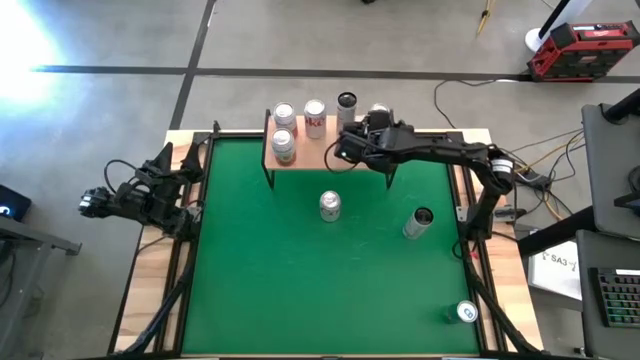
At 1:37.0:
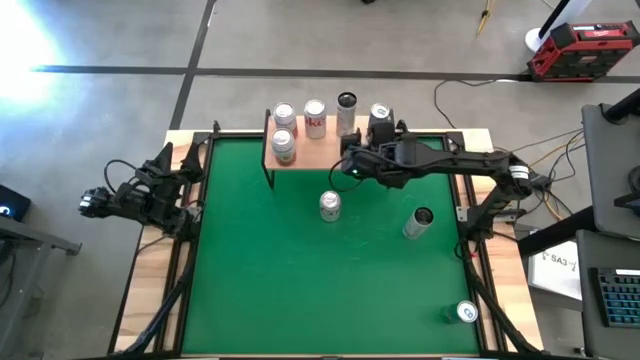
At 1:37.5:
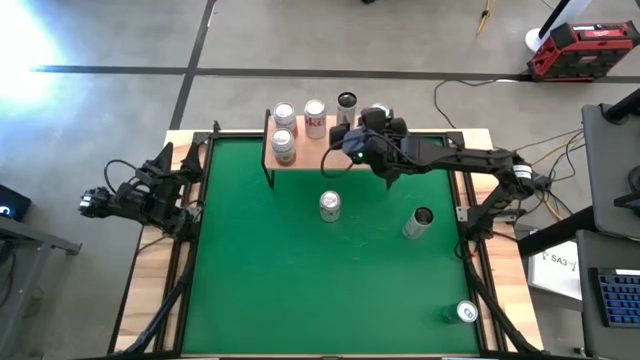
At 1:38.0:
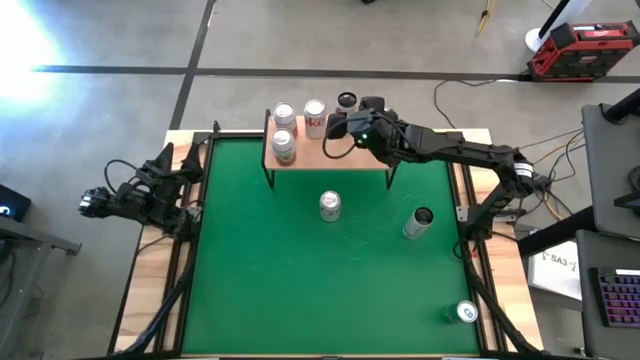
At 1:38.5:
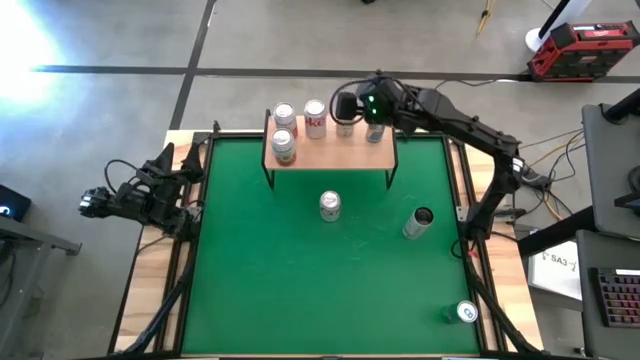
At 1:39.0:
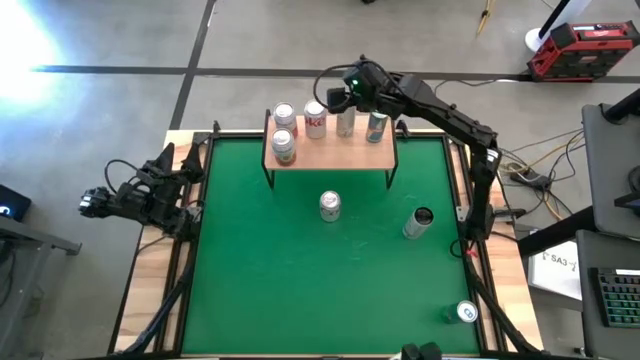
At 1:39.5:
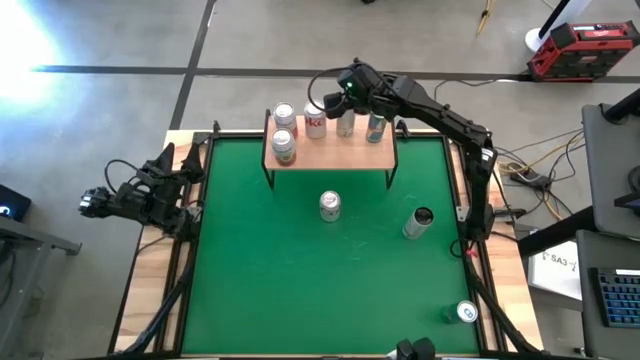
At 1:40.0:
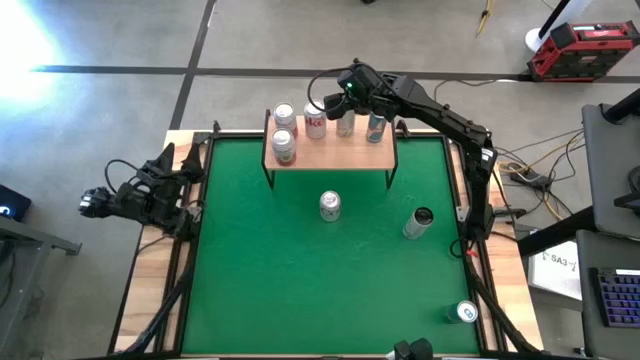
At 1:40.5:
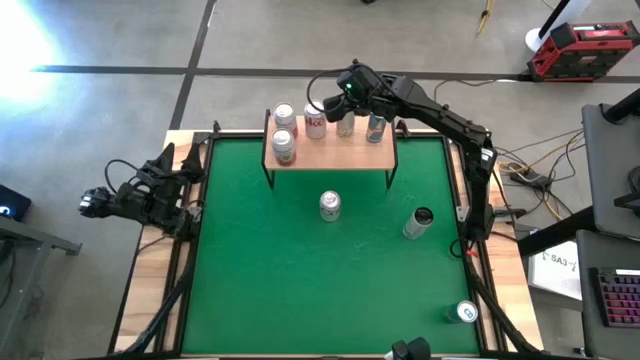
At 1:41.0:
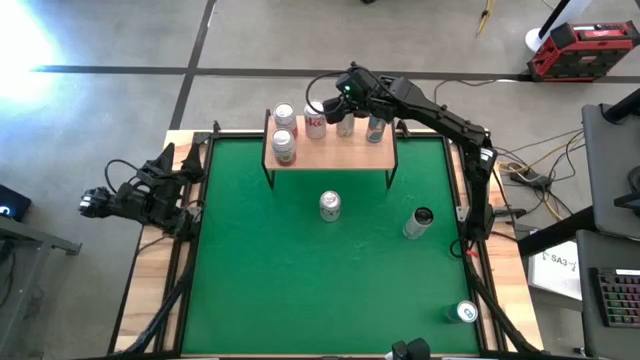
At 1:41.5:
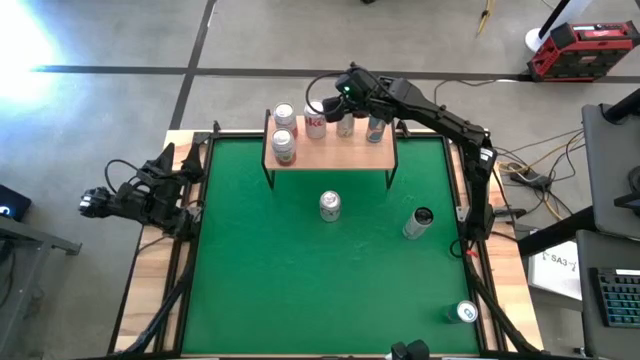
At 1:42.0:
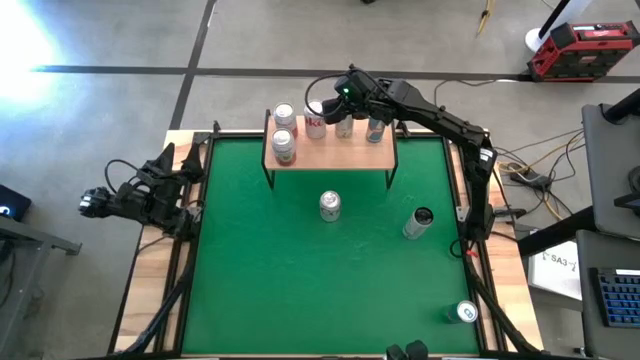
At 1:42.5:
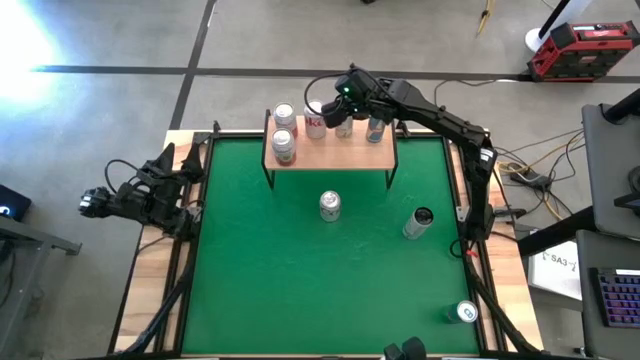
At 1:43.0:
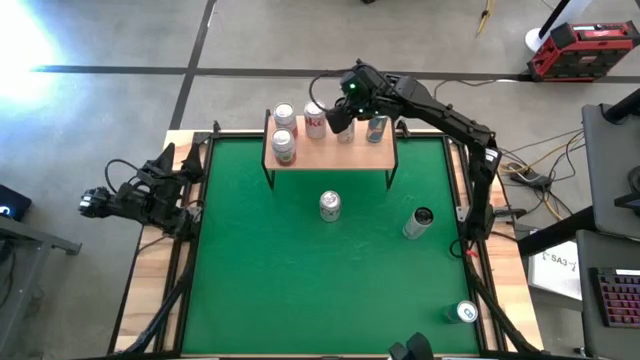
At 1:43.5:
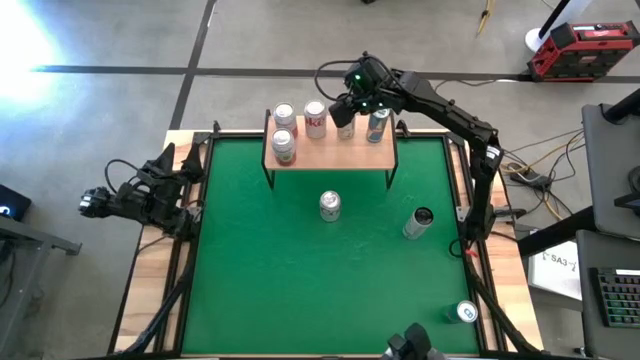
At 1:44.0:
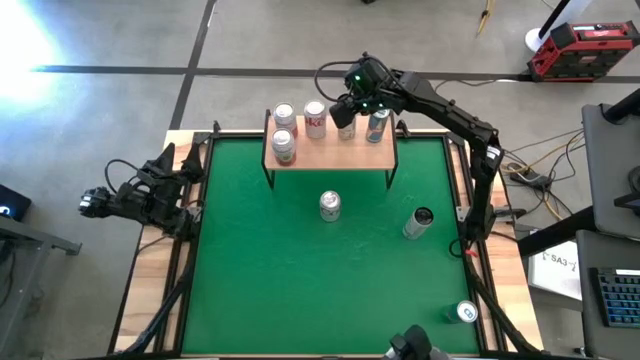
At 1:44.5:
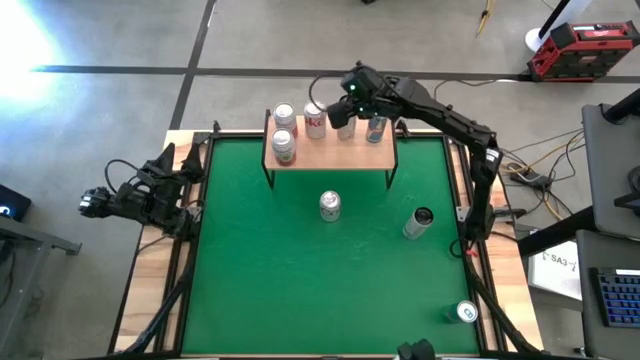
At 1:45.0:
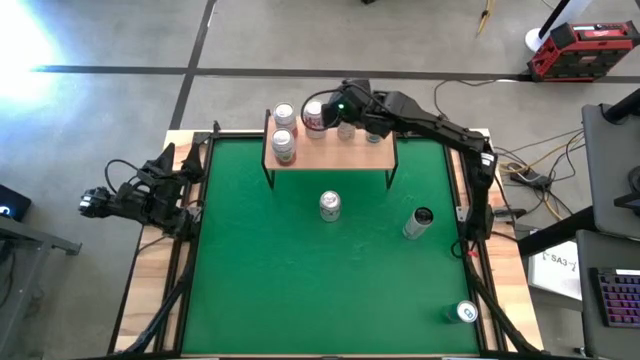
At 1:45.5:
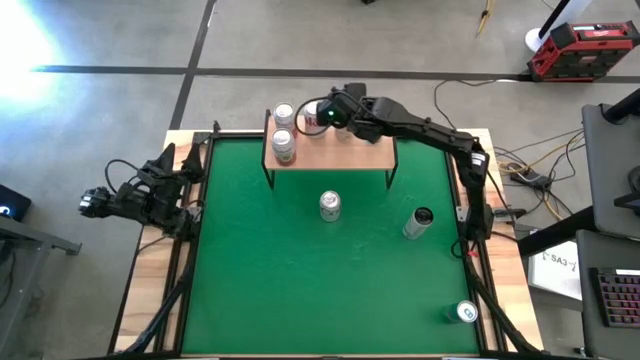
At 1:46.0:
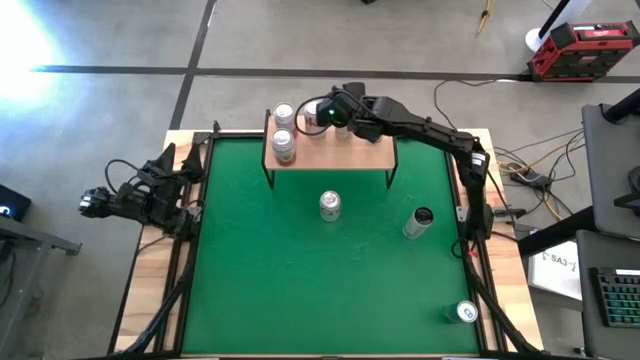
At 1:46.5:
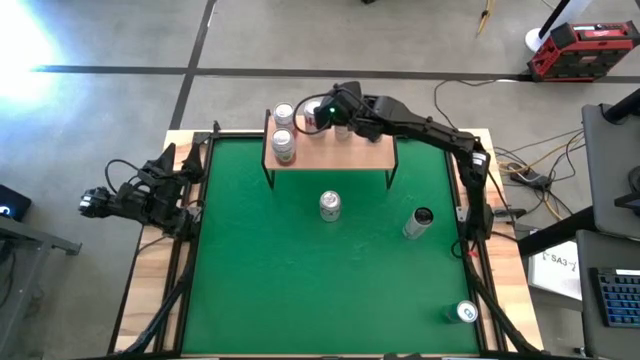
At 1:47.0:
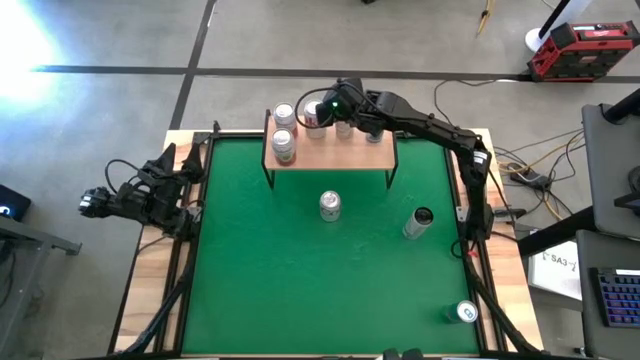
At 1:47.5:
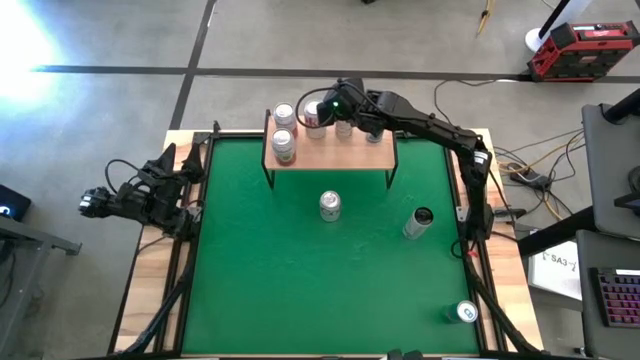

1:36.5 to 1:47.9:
Task: Place canned beverage on shelf
Adjust the white-yellow soda can on the shelf

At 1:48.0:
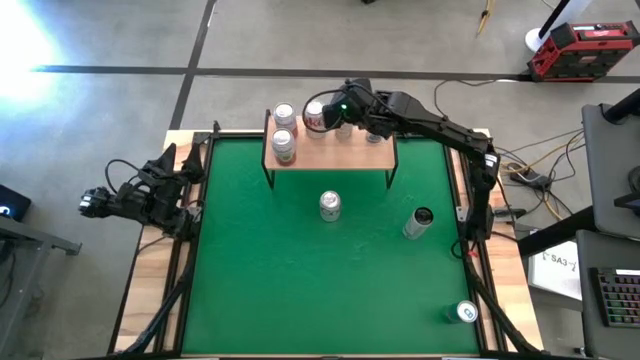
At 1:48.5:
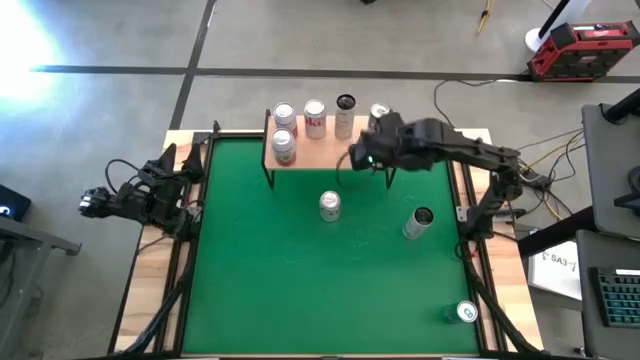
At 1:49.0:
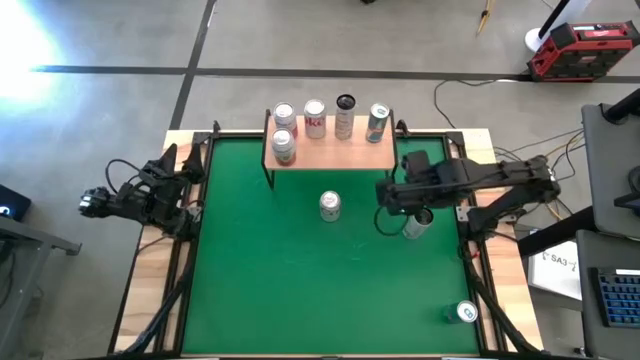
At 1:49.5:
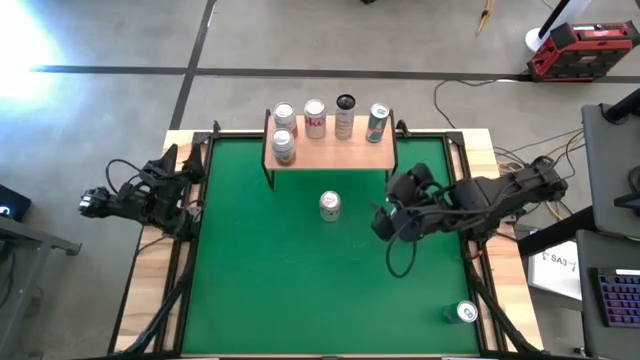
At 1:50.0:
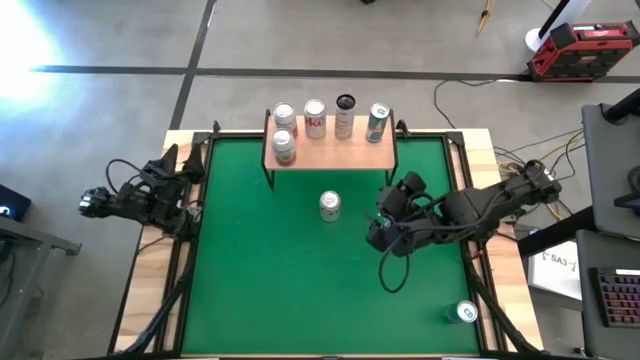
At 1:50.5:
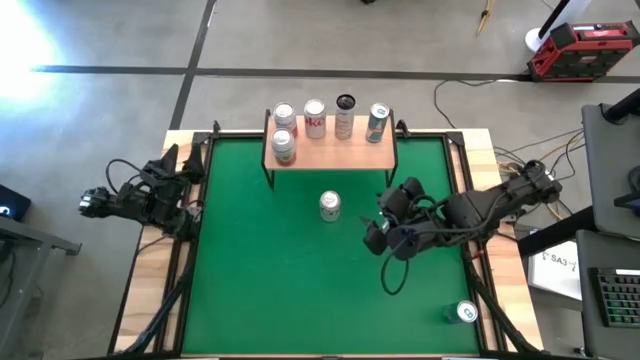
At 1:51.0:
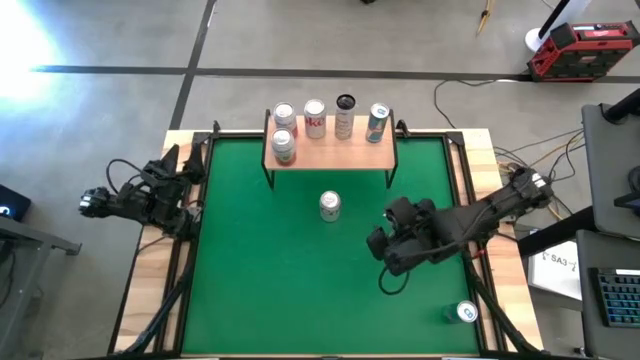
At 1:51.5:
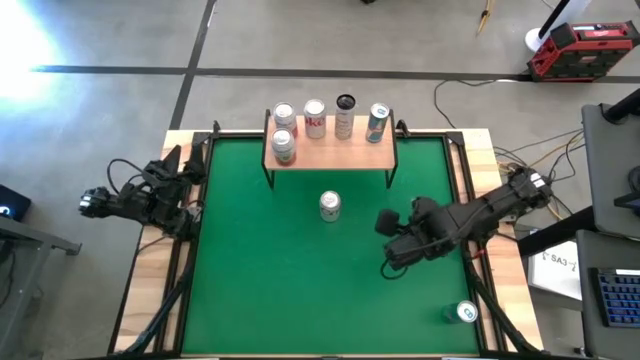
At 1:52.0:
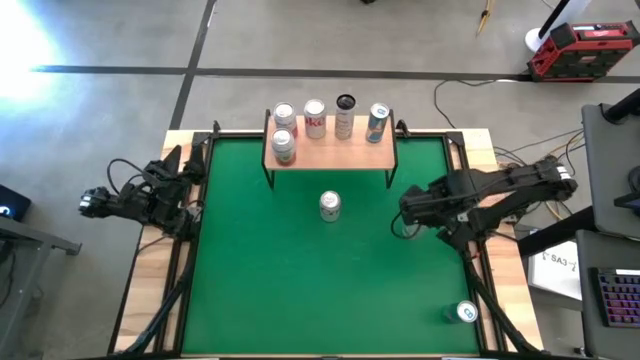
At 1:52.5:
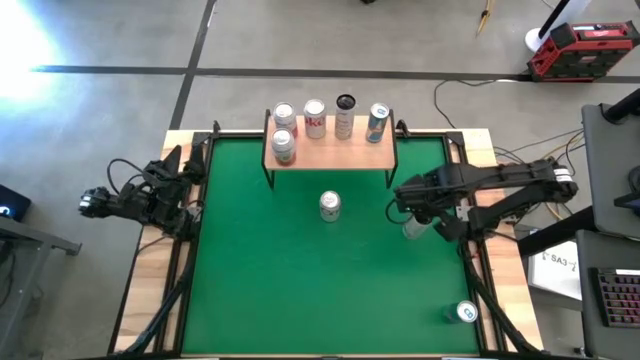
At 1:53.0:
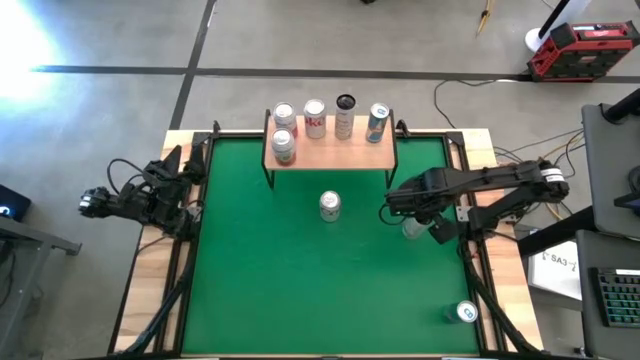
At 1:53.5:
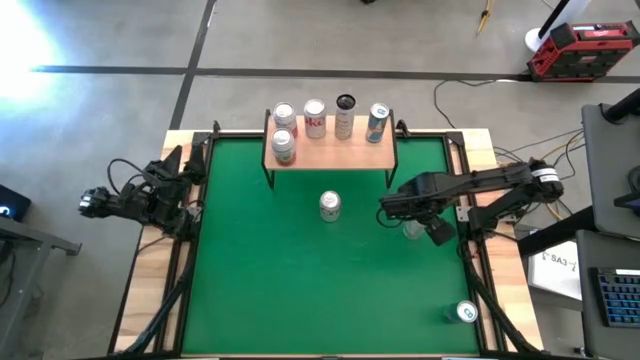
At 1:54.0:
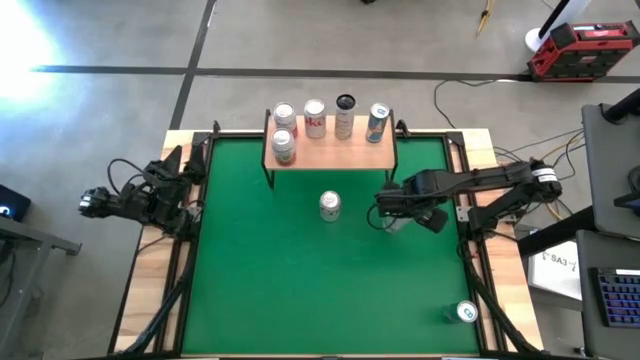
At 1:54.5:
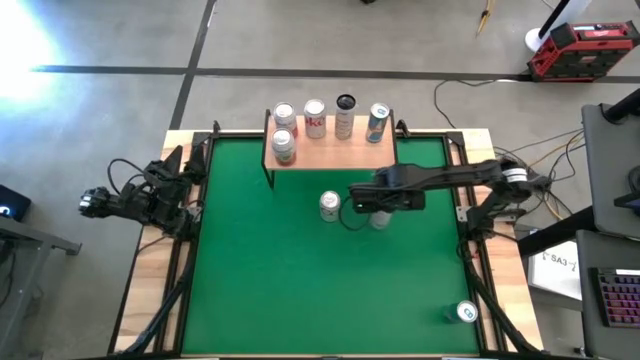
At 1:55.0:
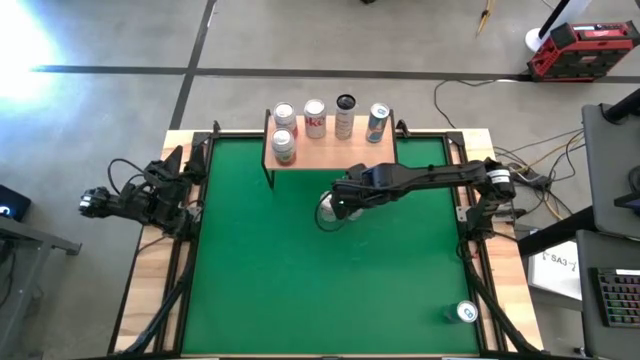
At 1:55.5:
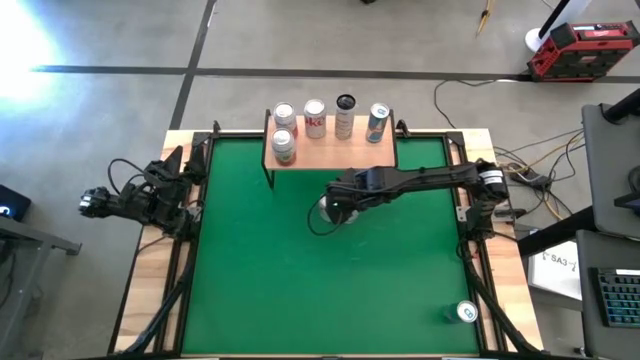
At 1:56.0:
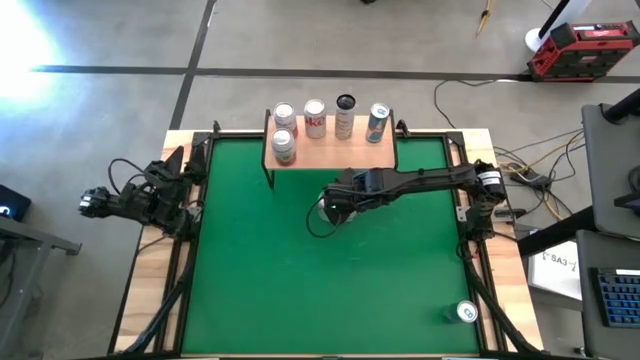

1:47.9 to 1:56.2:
Move the white-yellow soda can to the center of the table
